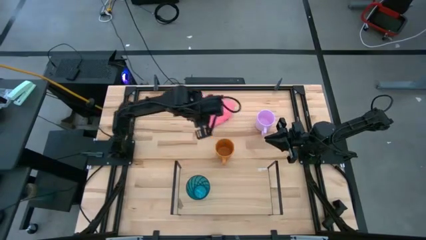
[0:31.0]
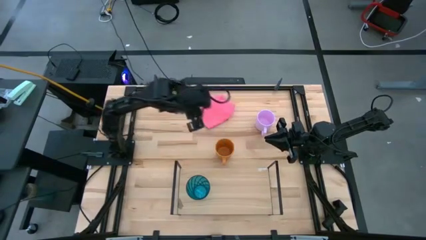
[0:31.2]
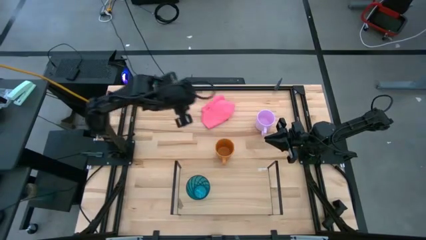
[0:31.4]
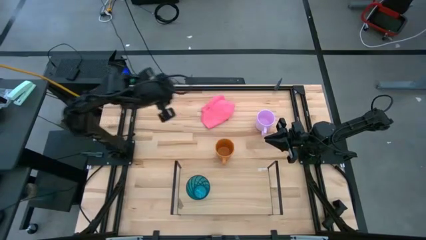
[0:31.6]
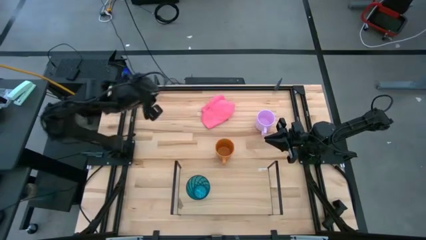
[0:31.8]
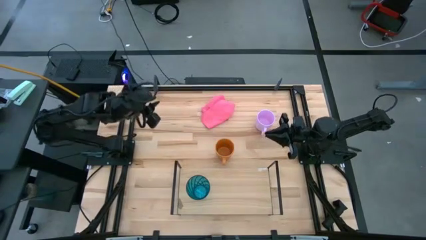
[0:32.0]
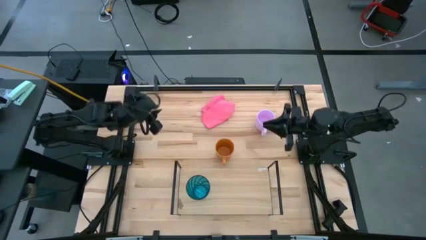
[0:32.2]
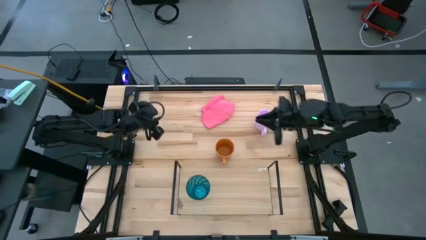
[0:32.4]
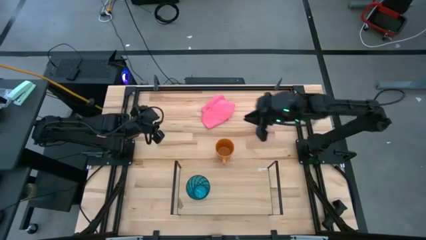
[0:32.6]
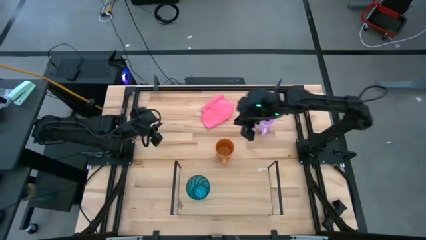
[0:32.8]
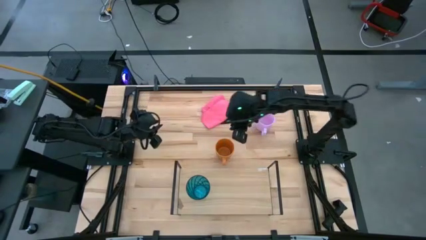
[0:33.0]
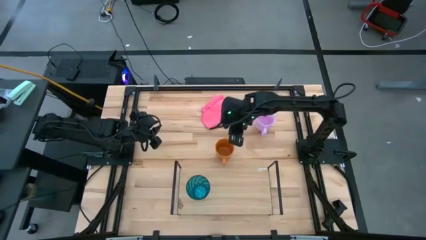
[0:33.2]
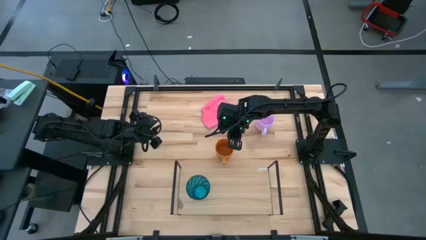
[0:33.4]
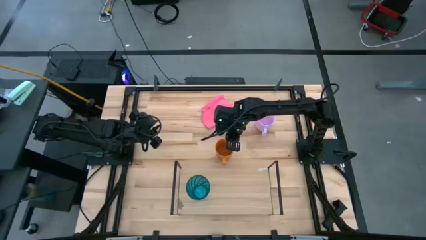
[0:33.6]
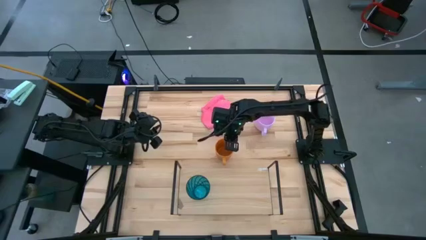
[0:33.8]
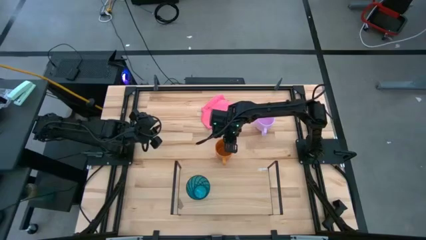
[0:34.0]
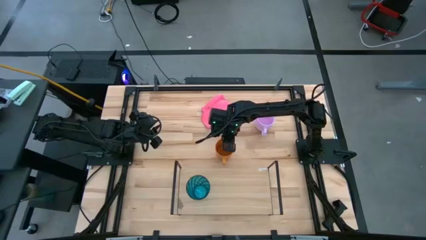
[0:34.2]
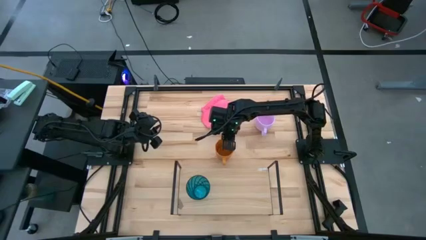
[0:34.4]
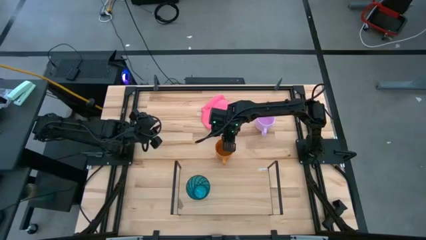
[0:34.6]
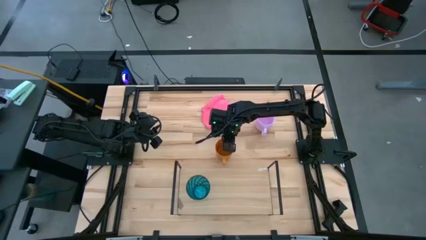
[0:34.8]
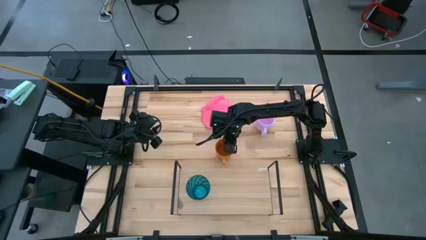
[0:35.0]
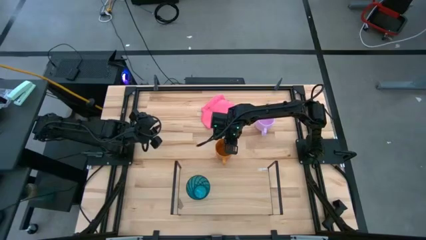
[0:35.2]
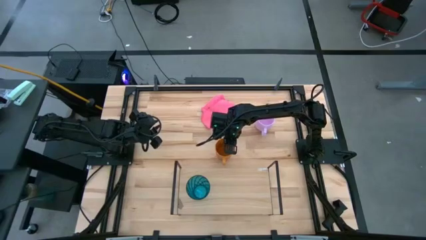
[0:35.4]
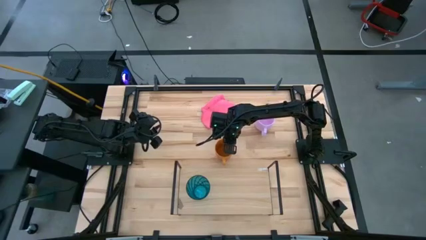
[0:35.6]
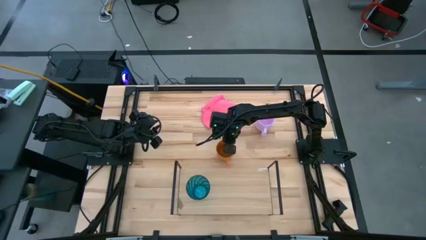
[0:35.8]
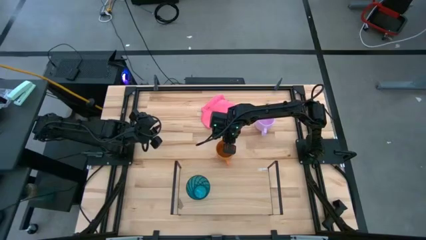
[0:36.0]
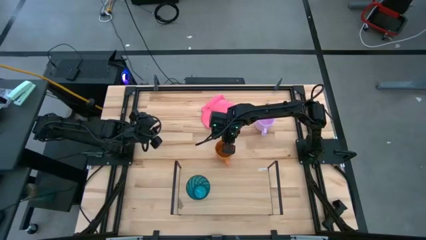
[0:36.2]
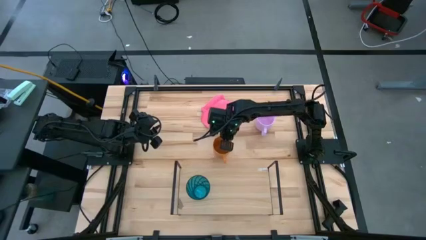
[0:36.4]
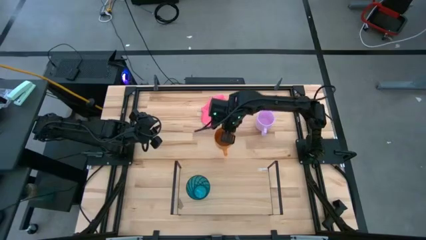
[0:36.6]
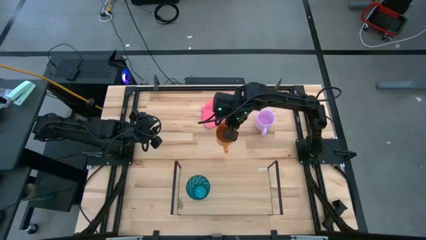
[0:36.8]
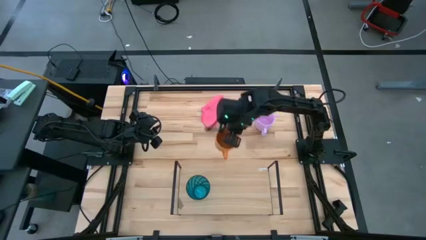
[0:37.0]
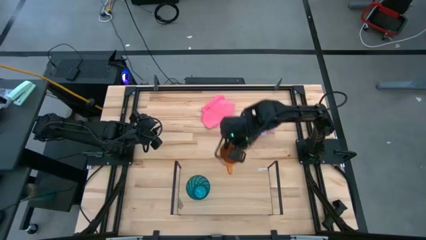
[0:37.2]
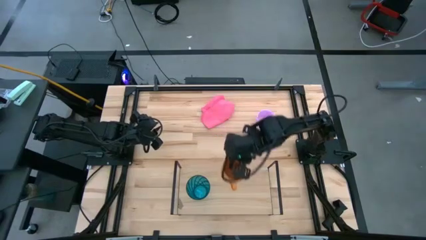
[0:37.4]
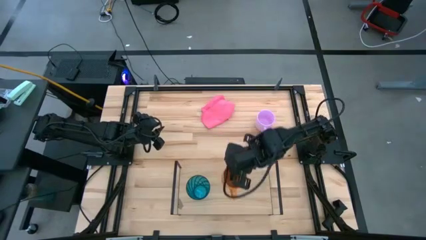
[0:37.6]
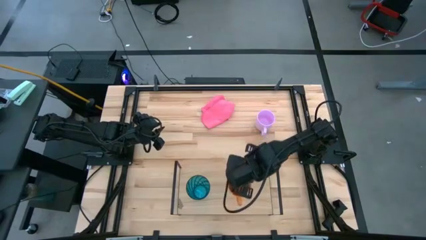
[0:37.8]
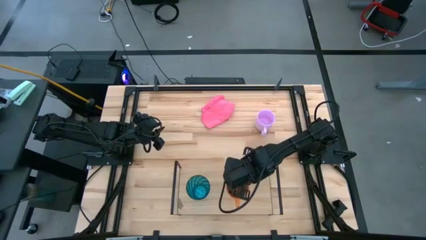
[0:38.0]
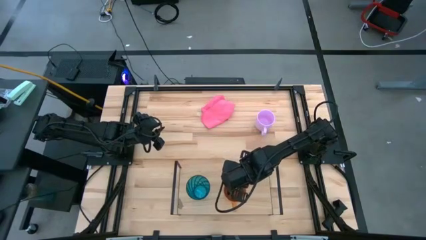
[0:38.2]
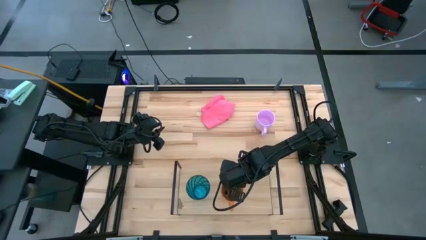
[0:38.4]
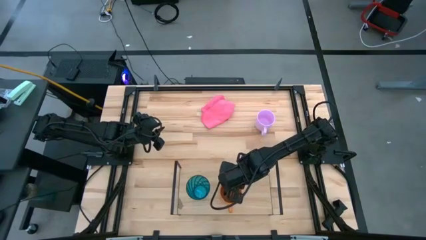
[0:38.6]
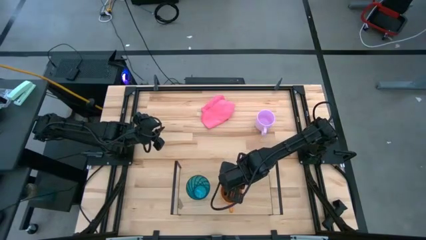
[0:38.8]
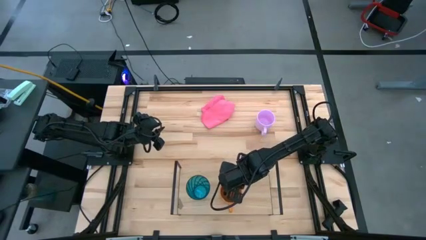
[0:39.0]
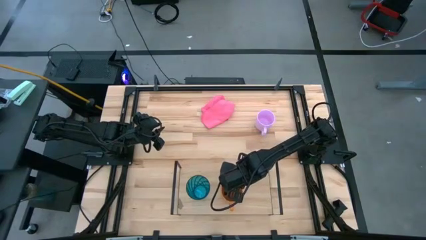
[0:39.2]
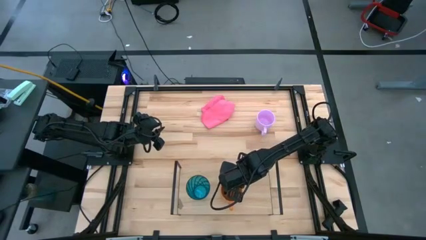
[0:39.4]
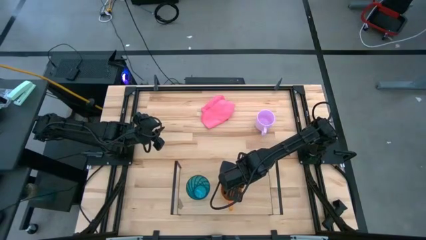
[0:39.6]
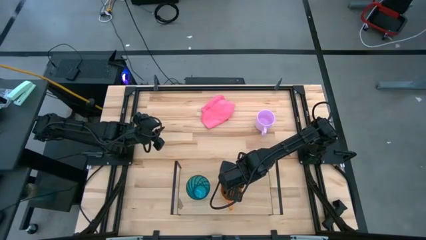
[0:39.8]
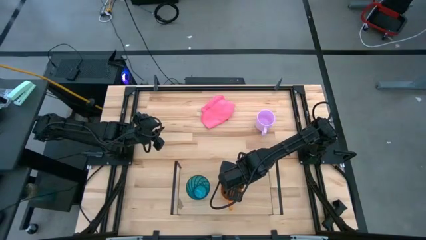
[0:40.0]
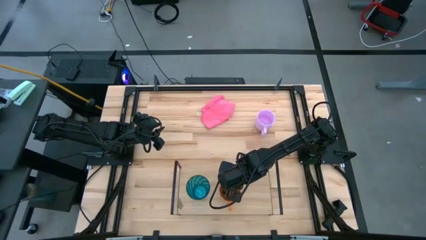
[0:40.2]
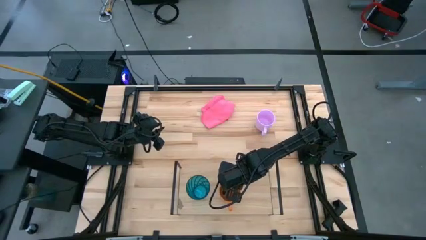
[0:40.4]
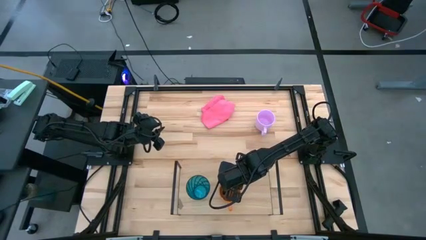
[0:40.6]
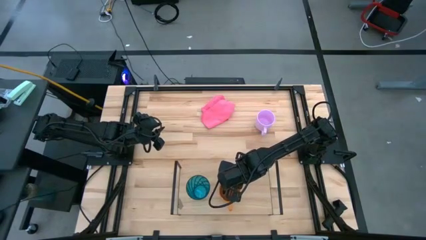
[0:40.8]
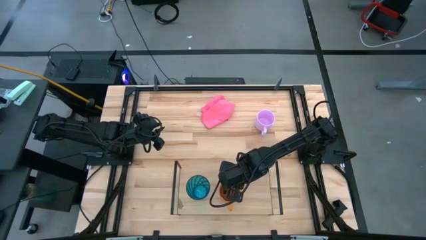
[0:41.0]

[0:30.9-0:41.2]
Task: Stack small to large cups/mugs on shelf
Put the orange mug on the shelf
